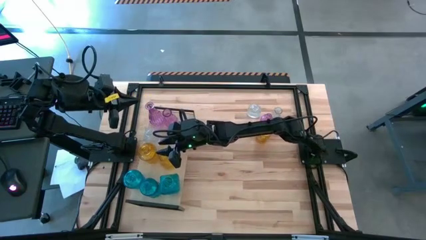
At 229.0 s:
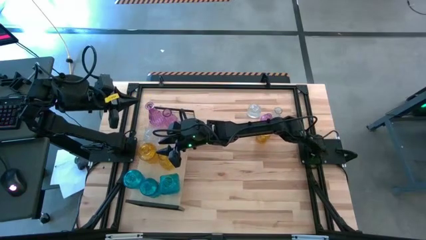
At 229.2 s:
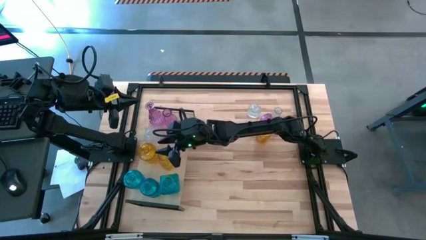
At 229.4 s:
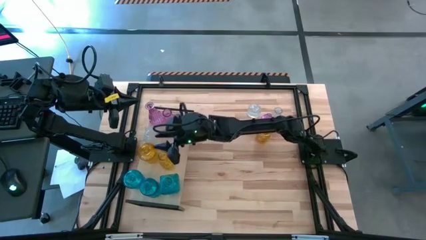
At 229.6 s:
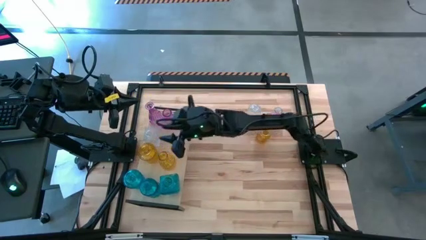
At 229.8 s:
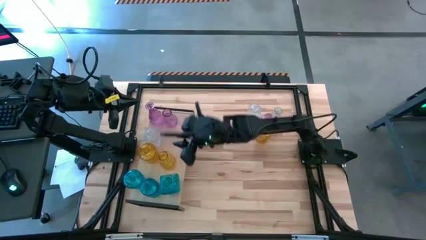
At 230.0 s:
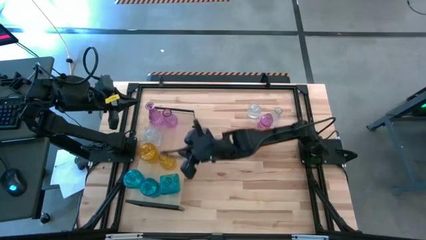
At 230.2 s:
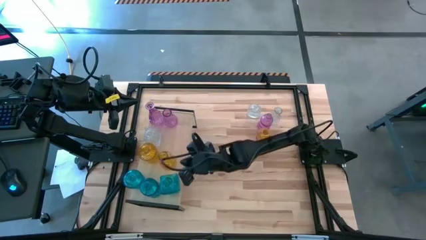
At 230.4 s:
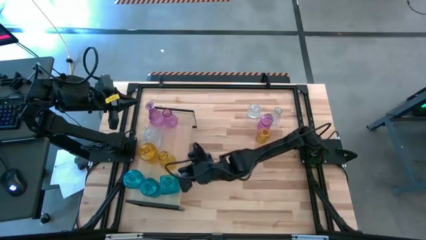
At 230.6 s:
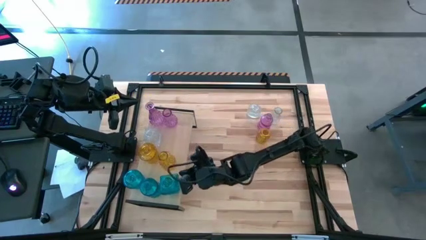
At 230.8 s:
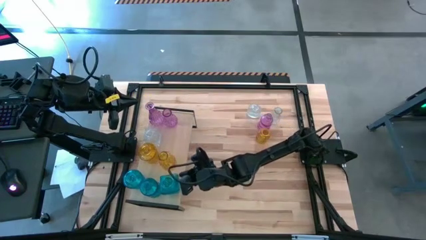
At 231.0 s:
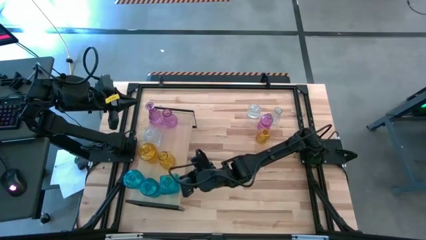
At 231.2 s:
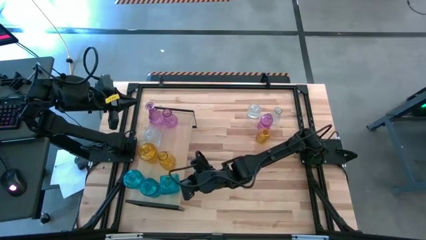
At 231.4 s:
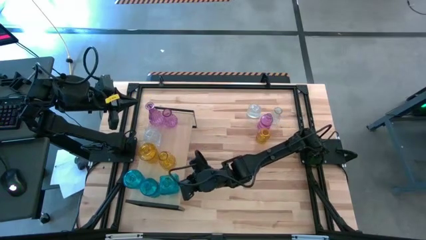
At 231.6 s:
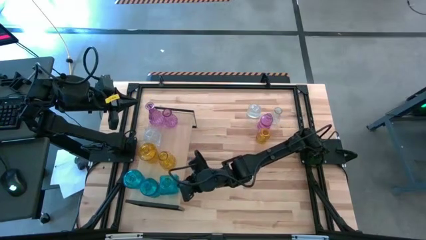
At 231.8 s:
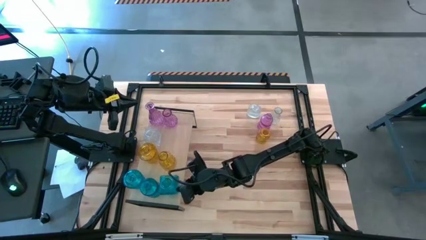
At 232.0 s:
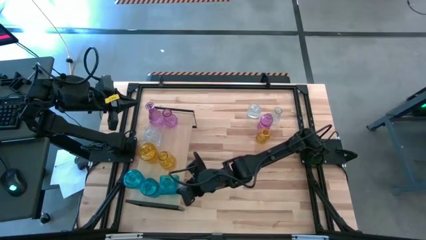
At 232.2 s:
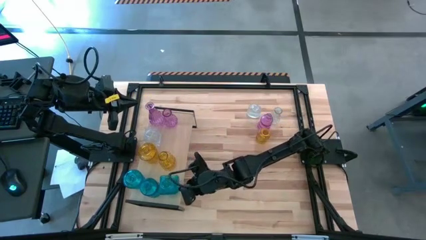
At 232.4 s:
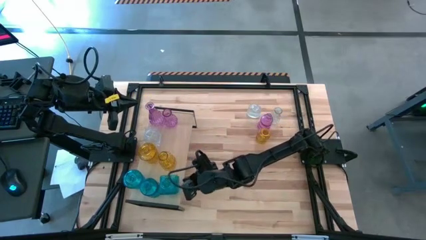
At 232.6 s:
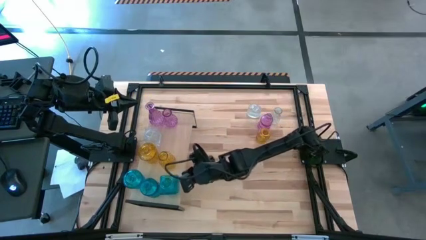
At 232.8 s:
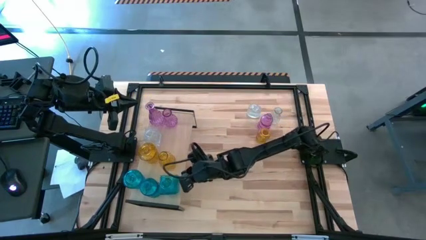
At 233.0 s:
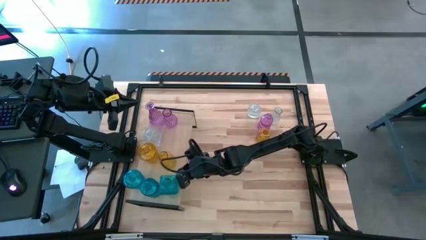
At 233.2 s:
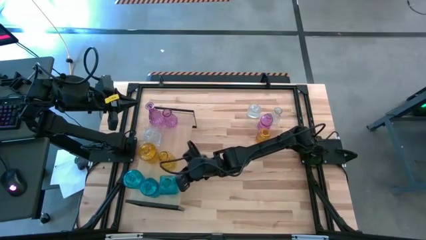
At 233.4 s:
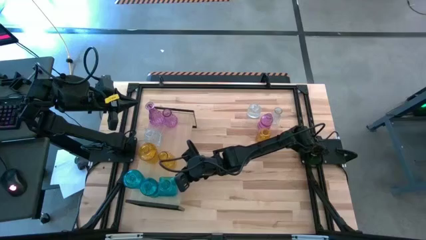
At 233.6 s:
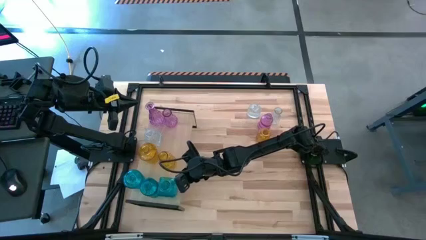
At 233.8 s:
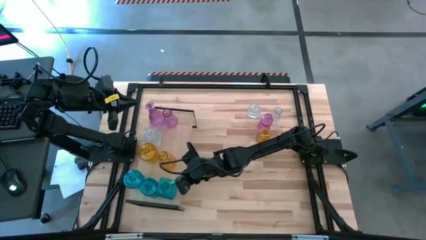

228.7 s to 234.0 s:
Task: sort vases onto shelf
Adjust the blue flower vase on the shelf

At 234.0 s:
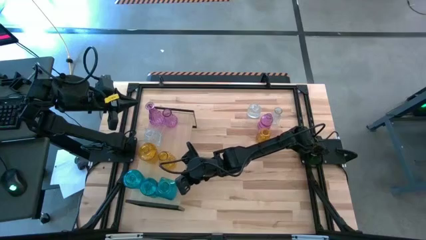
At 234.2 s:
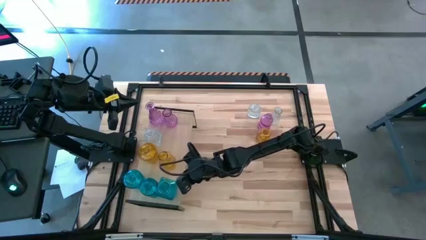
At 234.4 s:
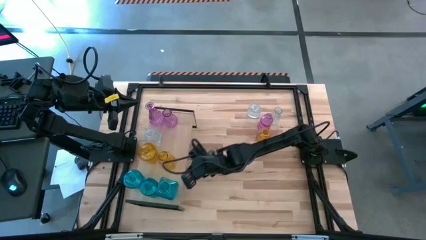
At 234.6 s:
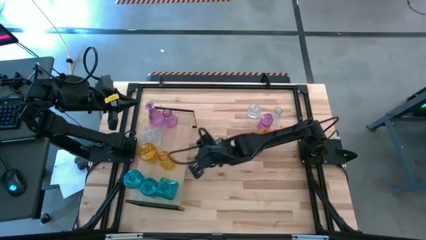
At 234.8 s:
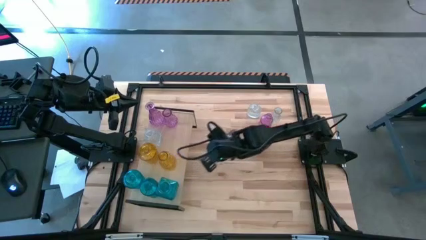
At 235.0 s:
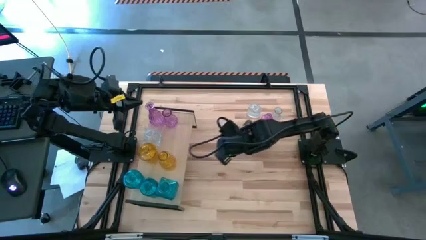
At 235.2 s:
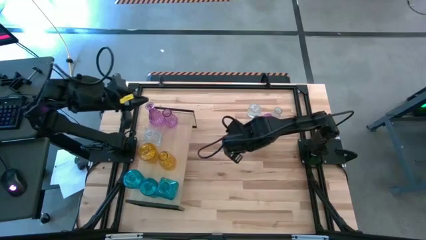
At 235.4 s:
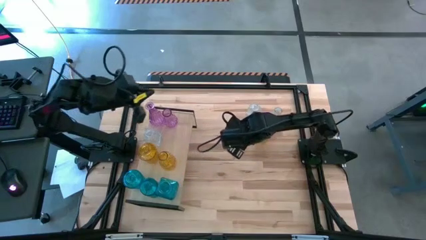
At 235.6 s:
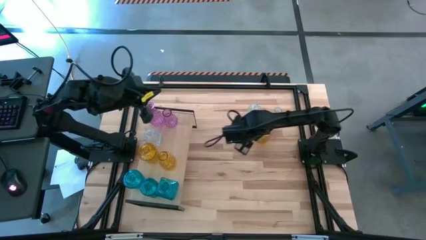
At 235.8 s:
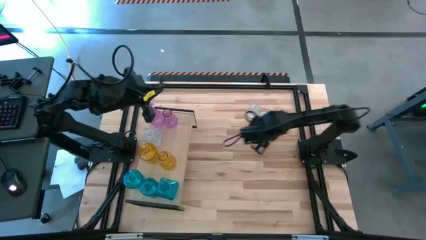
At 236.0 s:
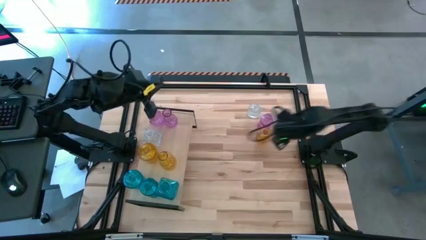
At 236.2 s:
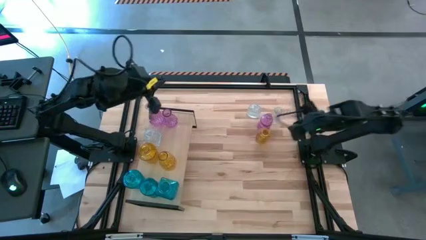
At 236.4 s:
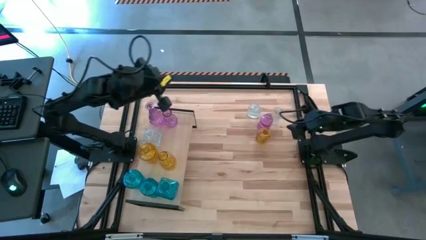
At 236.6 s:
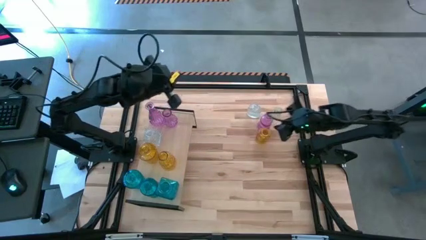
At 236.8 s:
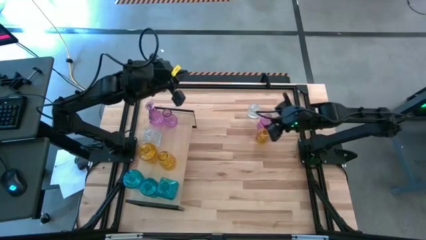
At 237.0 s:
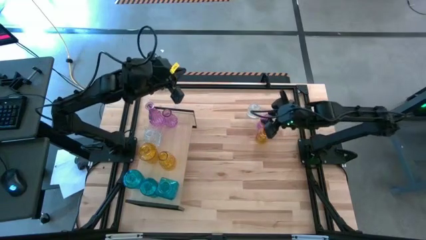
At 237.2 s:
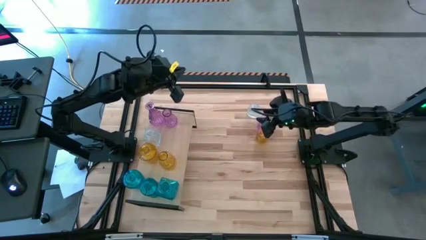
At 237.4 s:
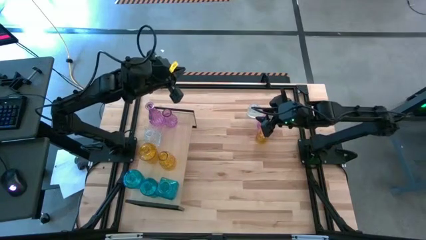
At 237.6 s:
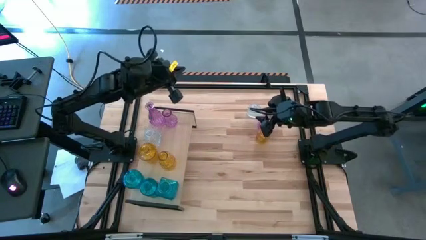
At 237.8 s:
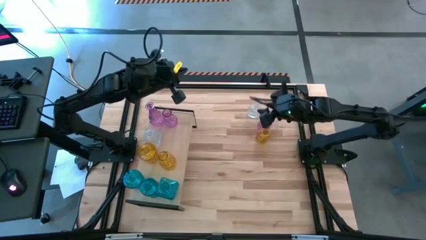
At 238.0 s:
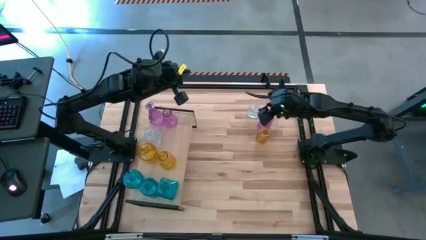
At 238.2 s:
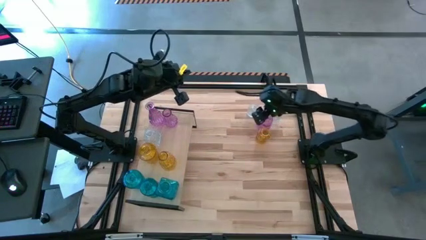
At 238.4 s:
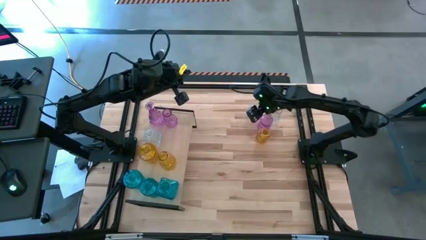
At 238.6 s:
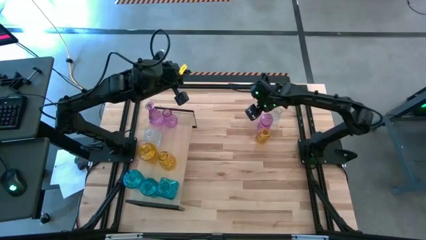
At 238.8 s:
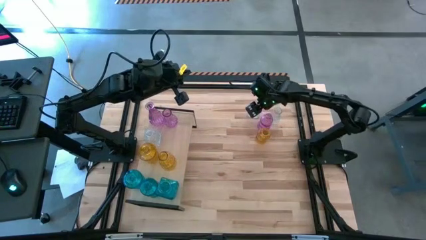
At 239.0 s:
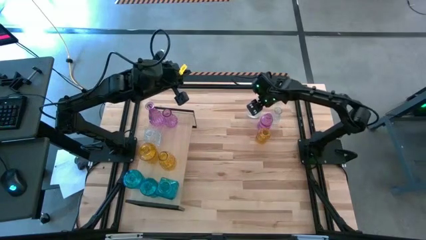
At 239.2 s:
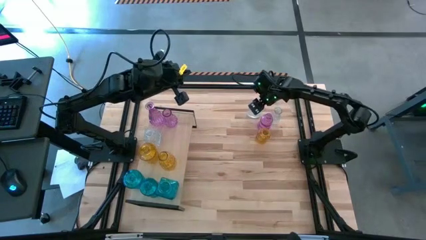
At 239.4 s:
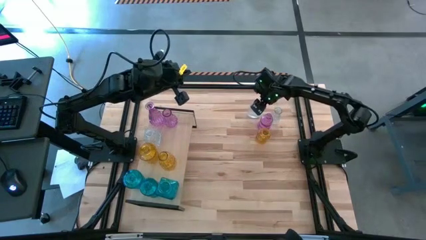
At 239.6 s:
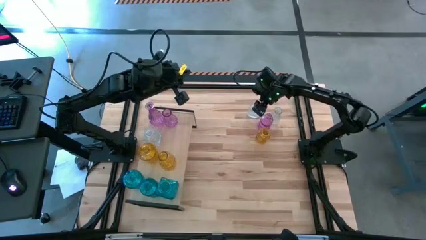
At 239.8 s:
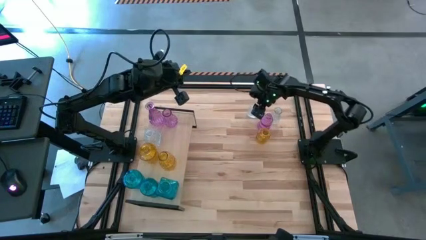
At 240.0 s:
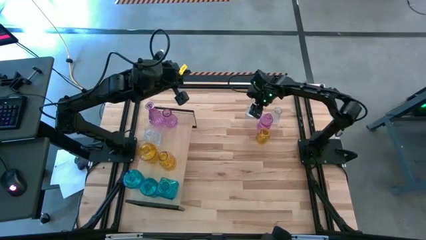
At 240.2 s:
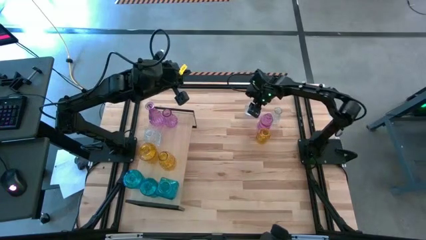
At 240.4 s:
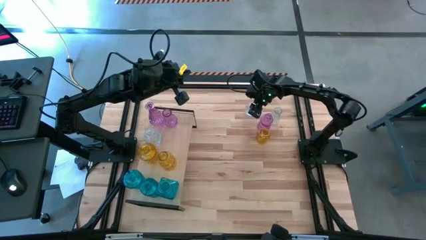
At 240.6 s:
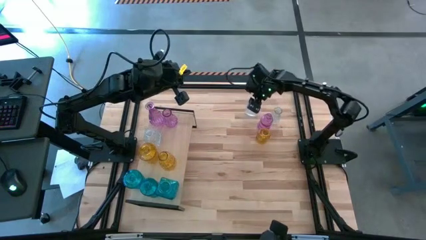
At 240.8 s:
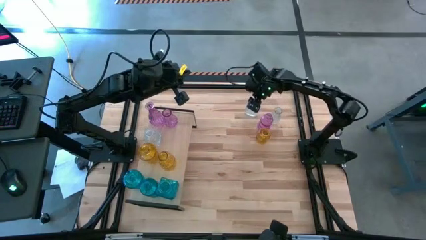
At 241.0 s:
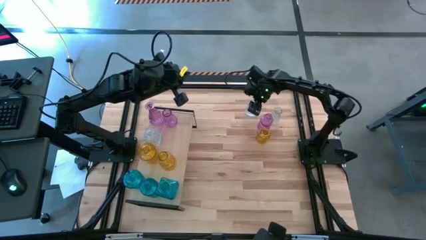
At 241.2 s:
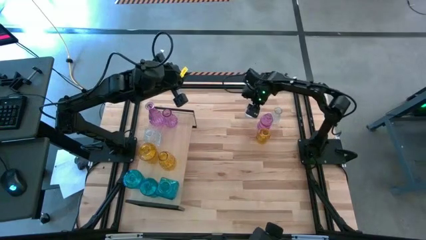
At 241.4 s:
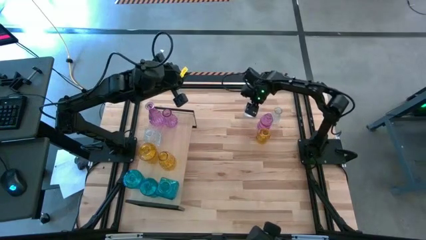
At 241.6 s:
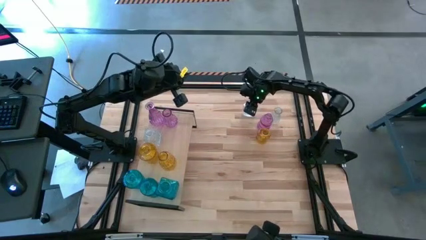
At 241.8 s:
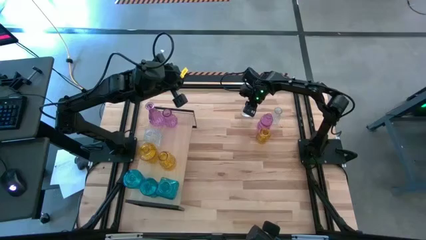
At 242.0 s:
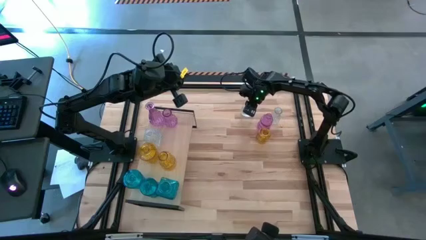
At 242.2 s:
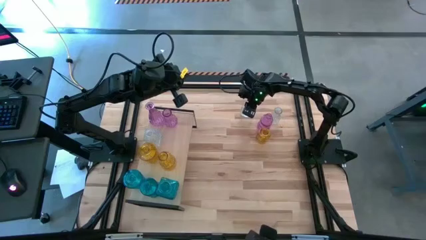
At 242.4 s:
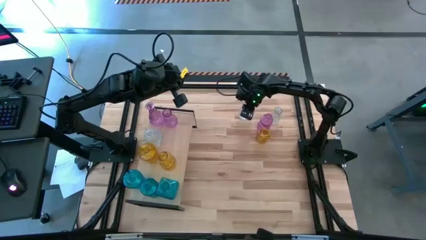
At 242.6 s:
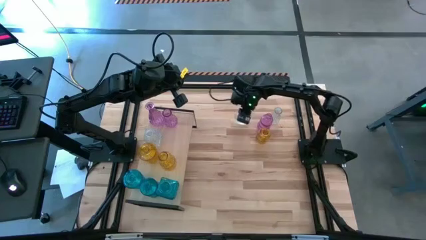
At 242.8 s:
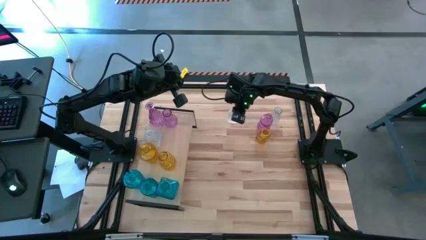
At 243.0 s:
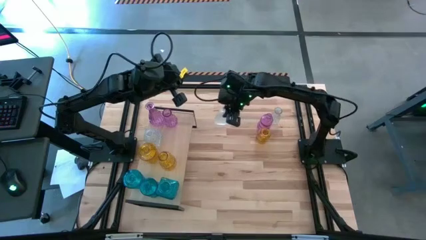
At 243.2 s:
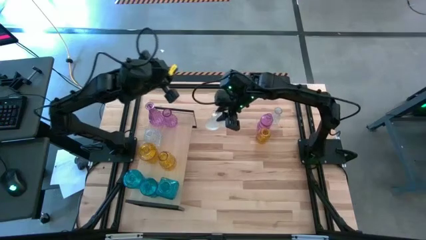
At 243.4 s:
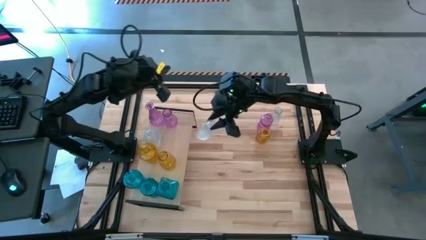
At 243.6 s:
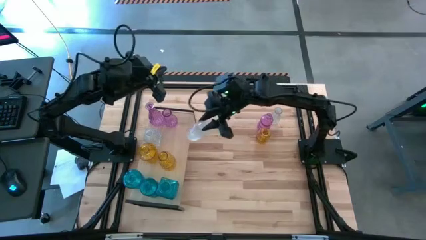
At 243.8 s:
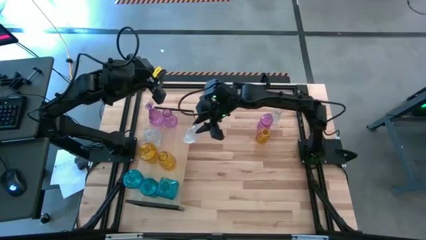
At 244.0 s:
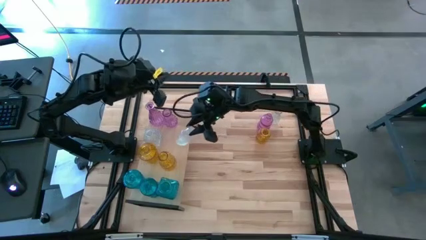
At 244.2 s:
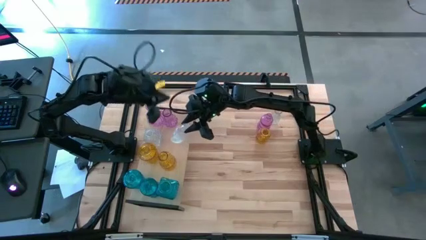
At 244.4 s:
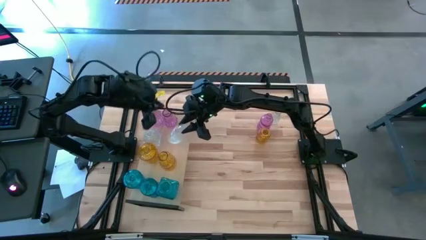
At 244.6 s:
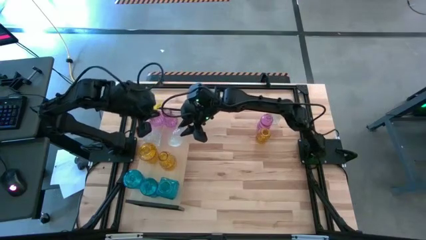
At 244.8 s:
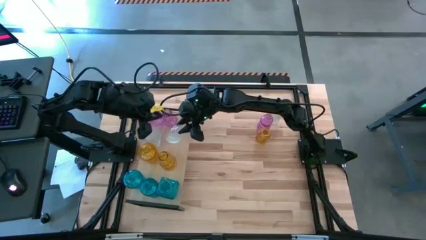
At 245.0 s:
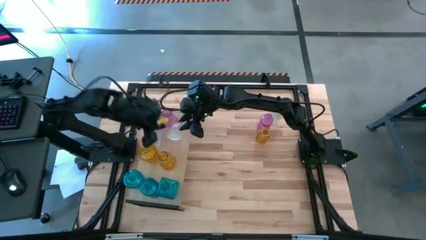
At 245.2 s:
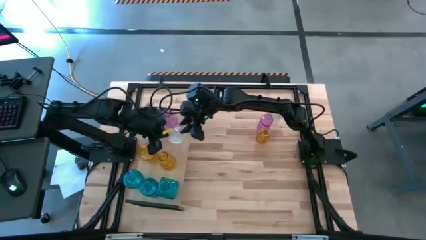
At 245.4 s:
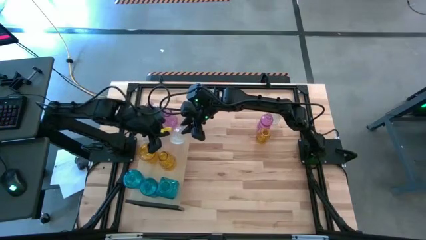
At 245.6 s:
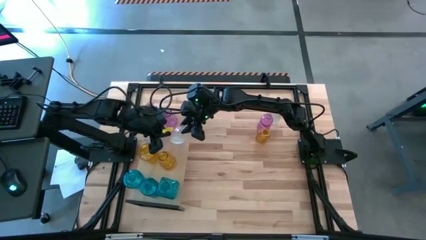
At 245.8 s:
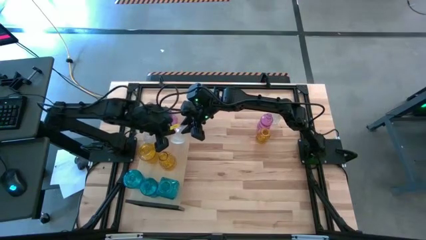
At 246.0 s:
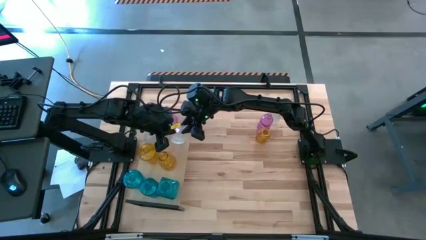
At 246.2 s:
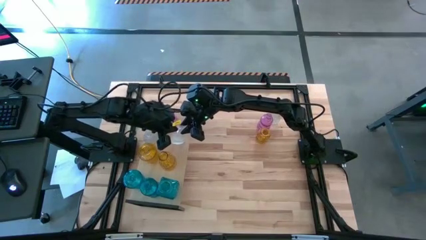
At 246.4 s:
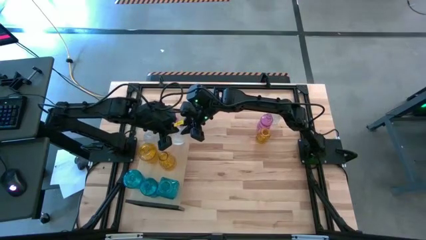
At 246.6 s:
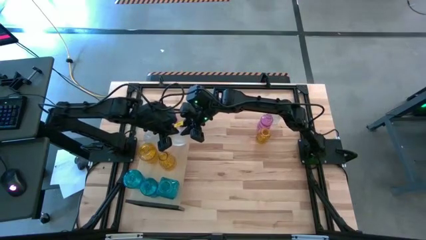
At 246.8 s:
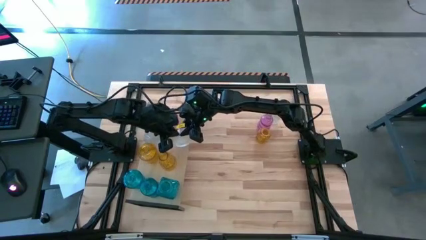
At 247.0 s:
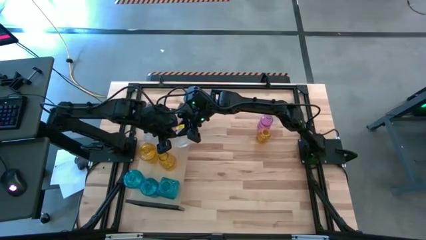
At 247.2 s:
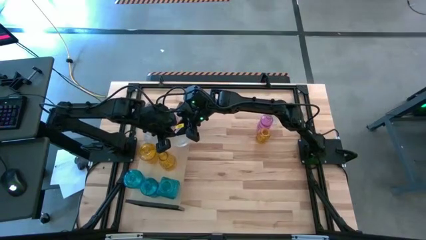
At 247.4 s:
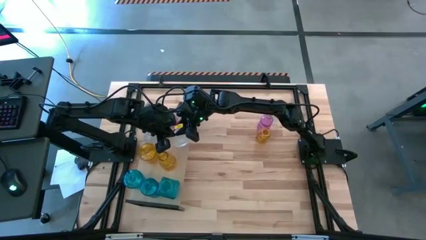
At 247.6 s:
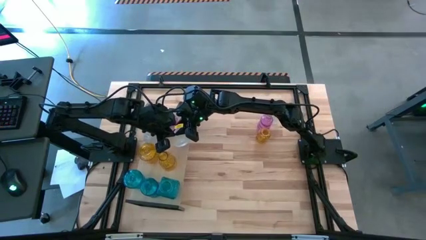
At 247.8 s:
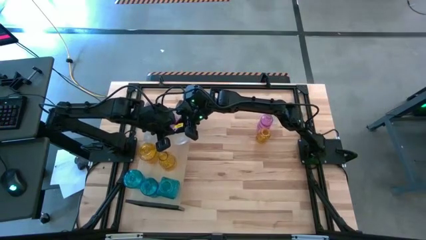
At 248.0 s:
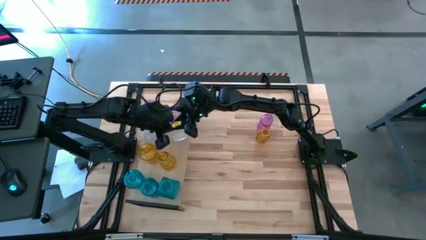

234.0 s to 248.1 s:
Put the left transparent flower vase on the shelf
